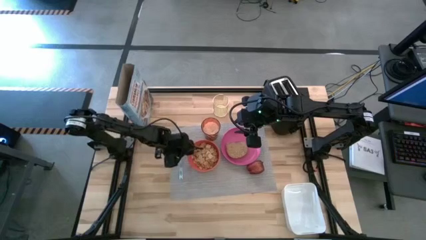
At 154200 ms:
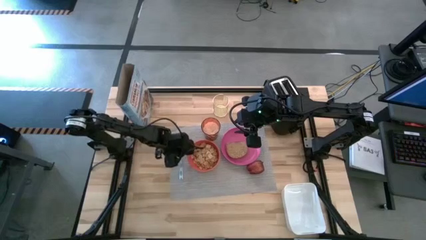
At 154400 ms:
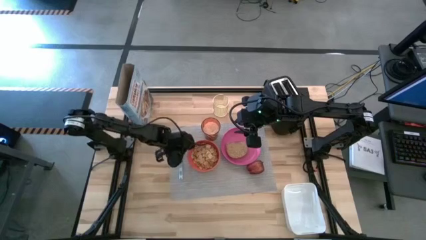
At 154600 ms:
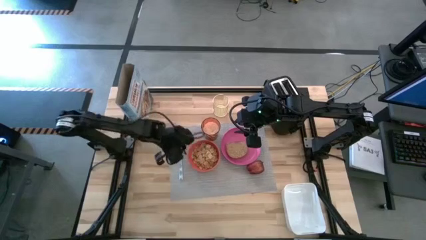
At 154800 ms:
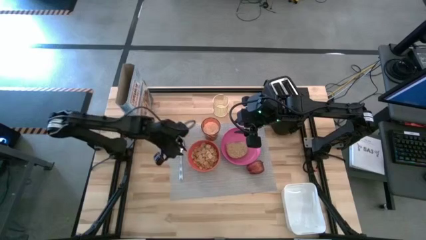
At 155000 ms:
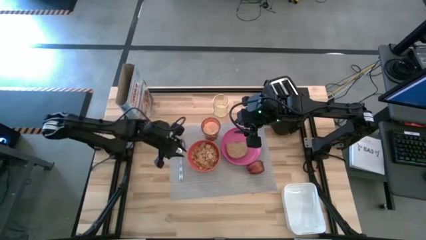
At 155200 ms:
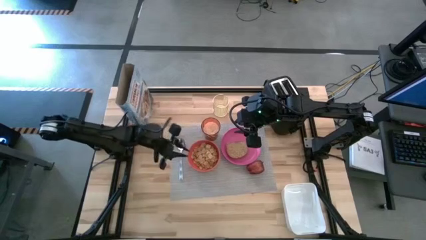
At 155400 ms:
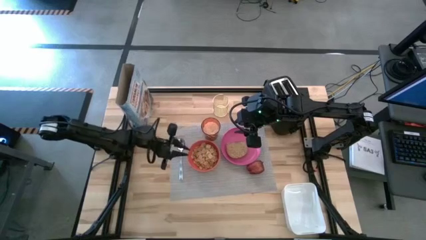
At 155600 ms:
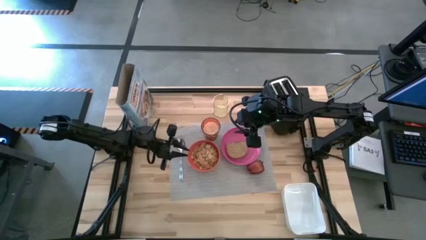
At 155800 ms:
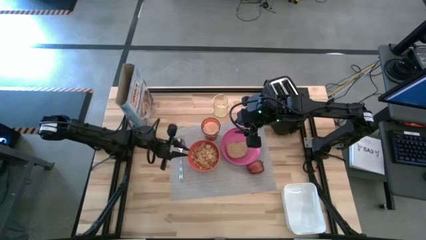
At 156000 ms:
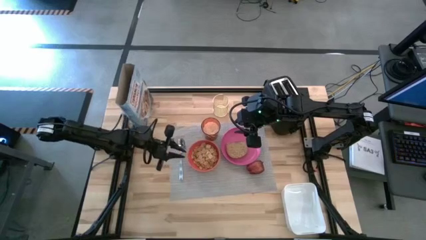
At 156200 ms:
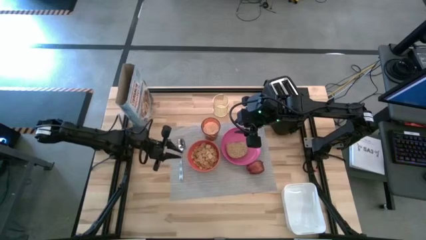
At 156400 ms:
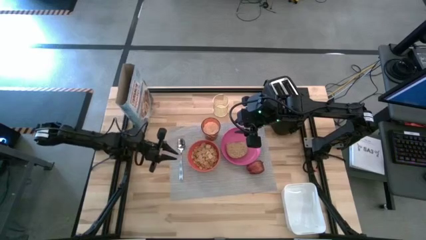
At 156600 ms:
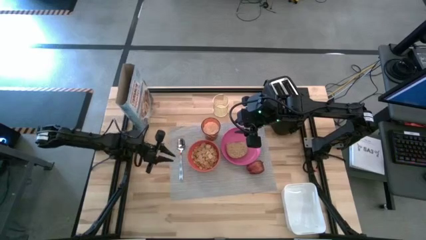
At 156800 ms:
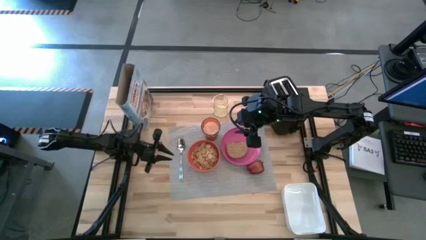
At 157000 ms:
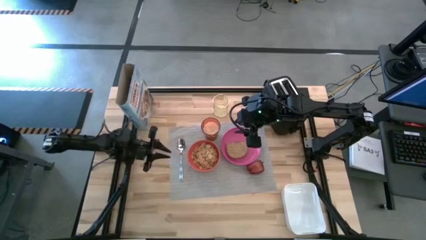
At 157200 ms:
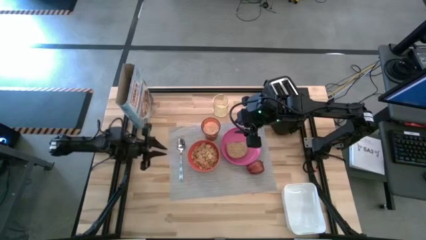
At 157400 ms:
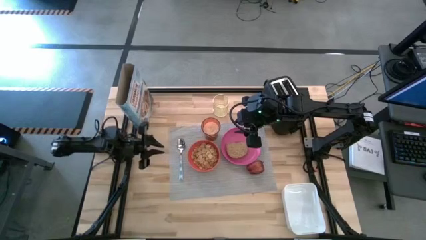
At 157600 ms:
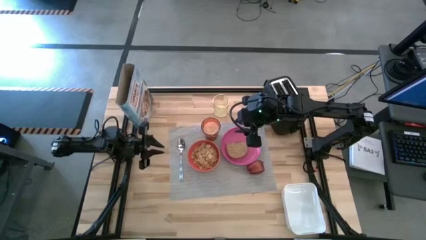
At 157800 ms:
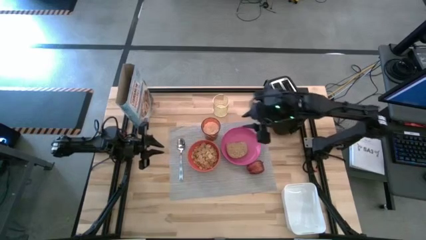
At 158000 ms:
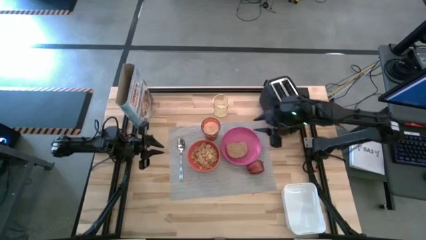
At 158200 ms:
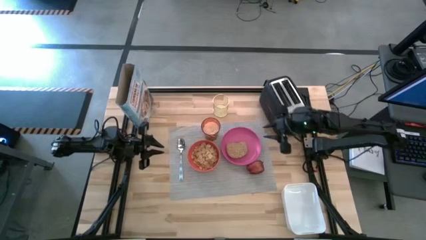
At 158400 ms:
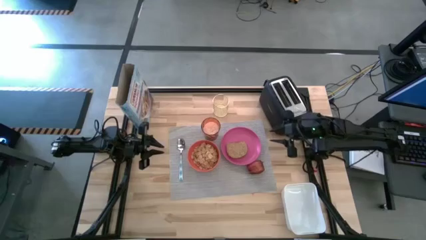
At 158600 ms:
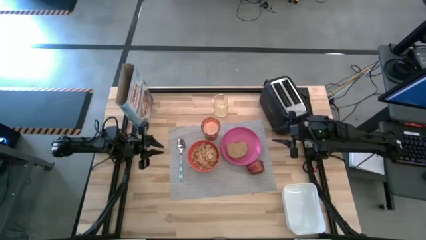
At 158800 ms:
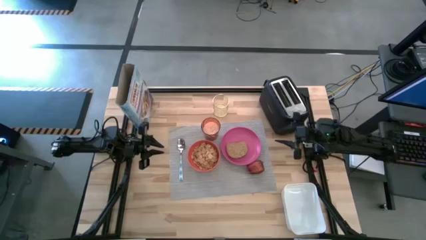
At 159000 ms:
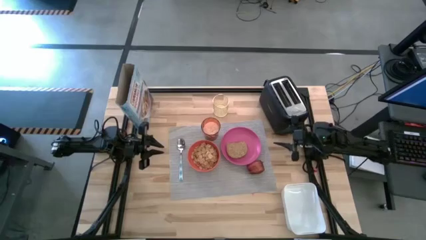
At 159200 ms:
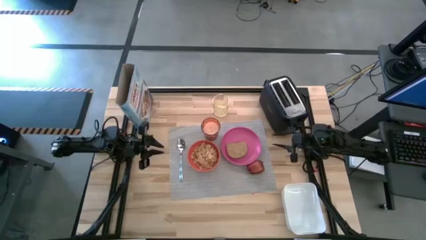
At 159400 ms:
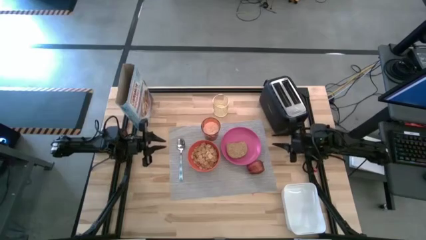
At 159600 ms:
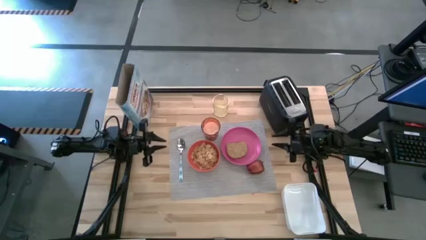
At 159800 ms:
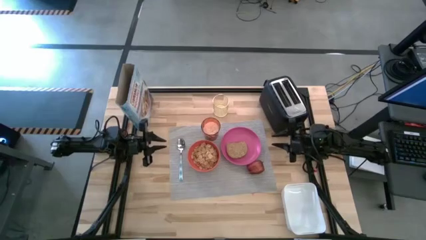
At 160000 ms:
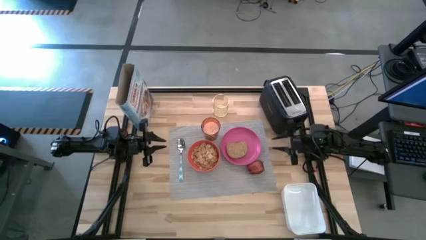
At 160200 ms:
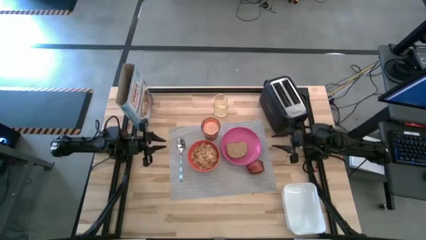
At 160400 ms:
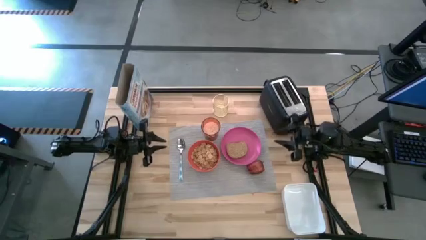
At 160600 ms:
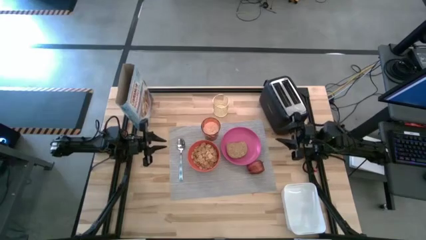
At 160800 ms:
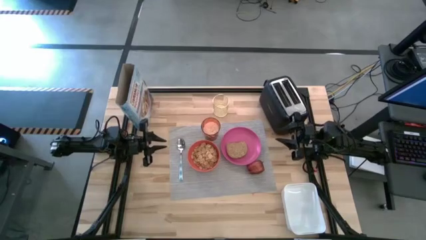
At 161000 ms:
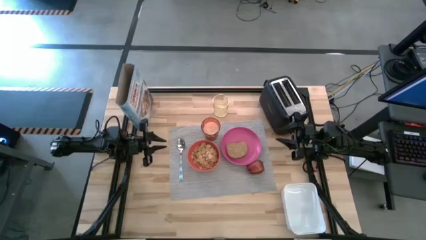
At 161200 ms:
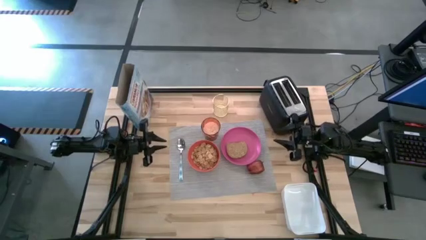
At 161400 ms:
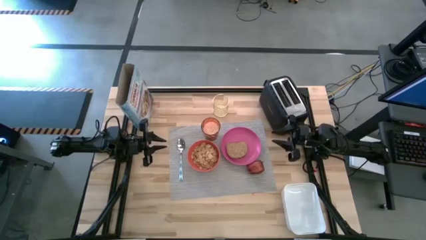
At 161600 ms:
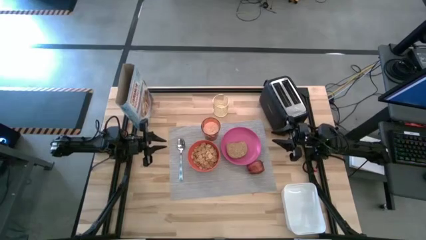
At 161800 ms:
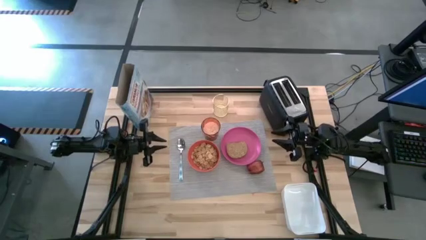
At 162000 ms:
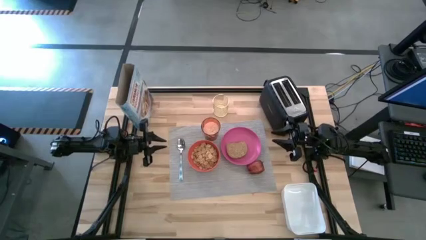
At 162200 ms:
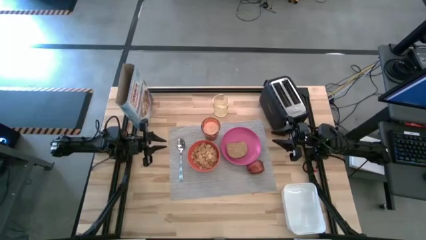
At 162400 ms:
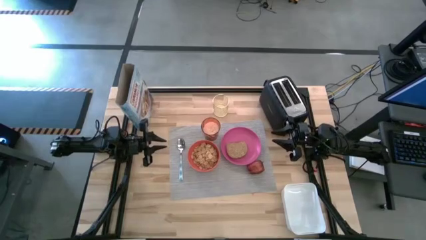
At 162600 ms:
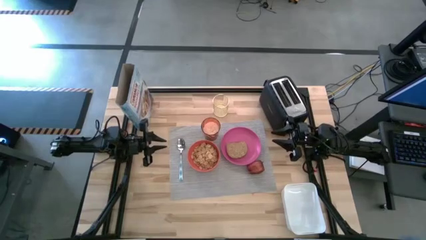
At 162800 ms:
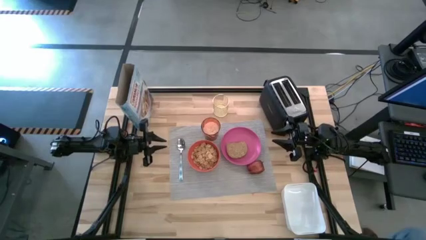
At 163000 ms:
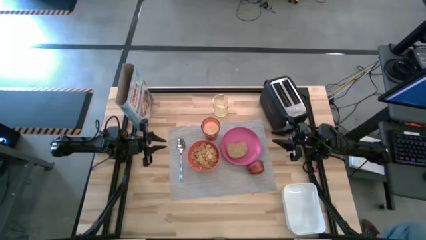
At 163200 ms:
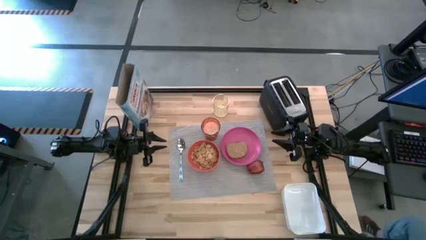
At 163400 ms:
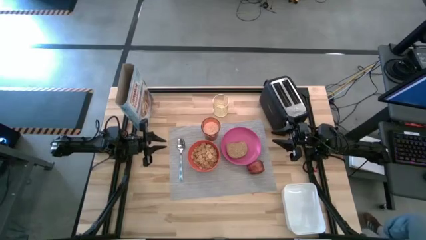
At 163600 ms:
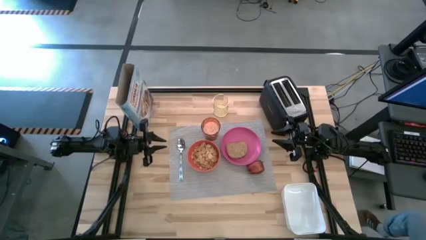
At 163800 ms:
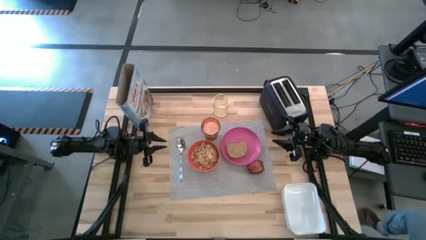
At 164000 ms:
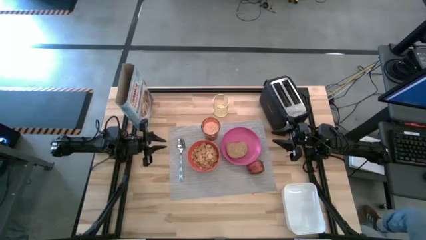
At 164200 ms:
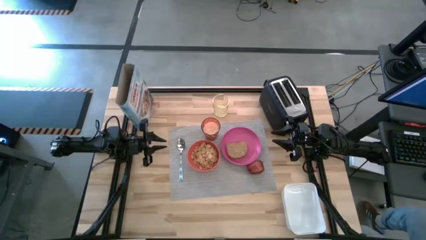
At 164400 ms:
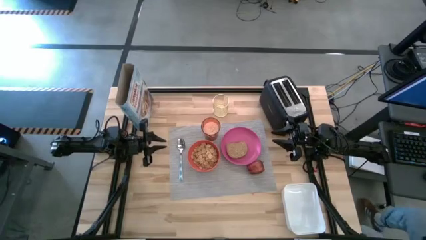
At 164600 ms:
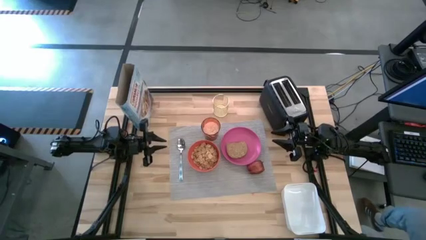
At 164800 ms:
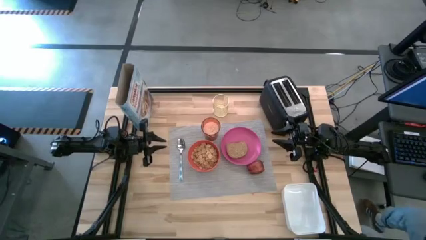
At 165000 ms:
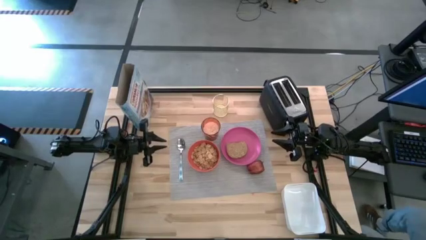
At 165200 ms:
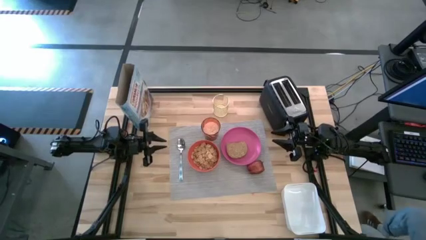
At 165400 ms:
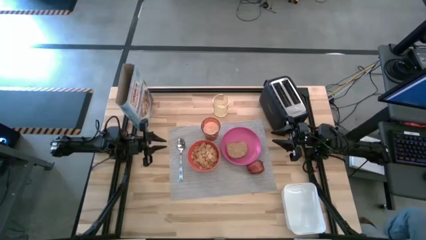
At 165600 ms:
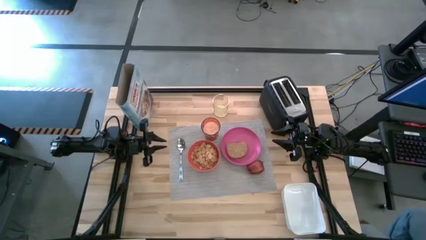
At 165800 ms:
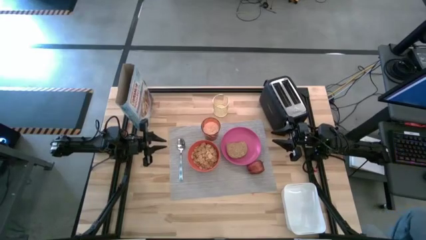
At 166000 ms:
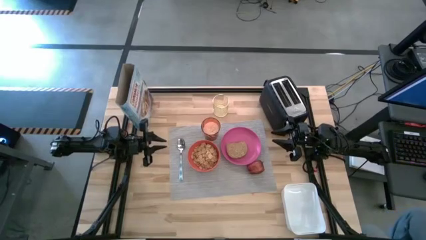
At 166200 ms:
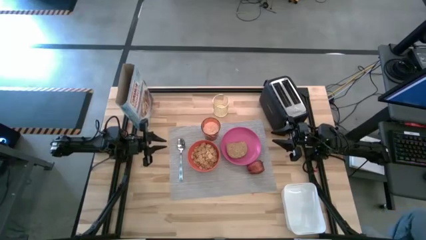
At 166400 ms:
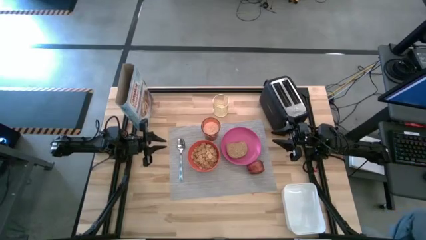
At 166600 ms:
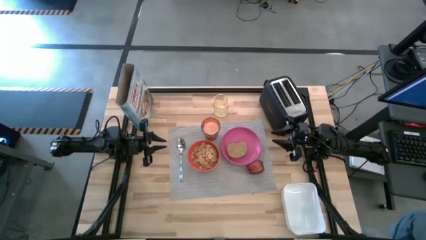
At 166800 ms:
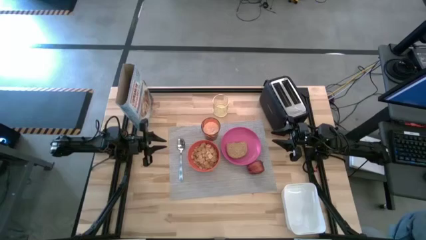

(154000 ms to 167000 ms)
Task: Arrange a breakfast setting
Return to Home Position
